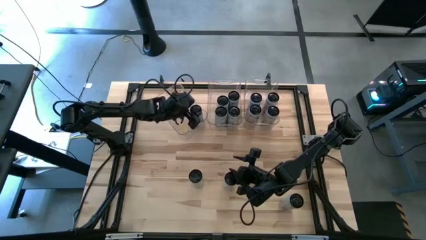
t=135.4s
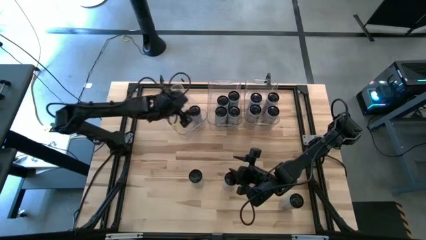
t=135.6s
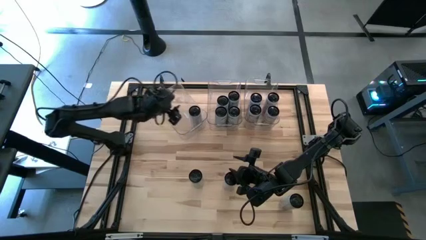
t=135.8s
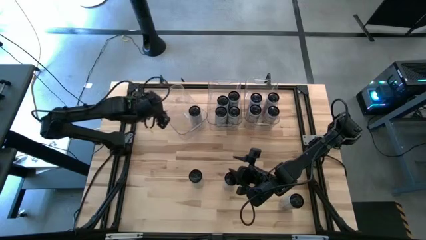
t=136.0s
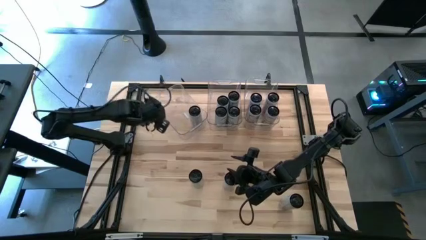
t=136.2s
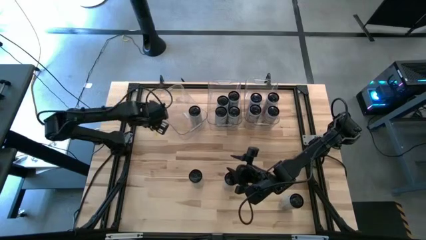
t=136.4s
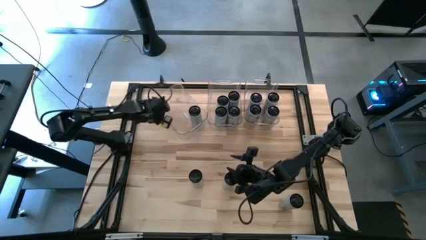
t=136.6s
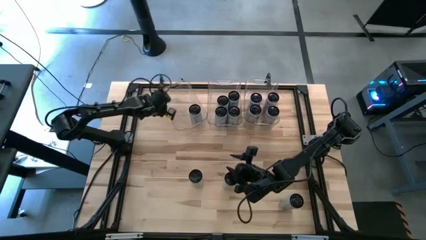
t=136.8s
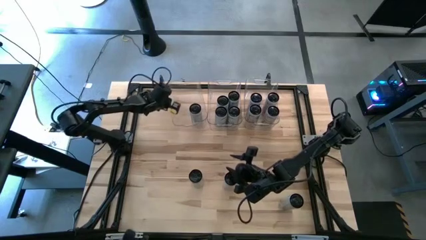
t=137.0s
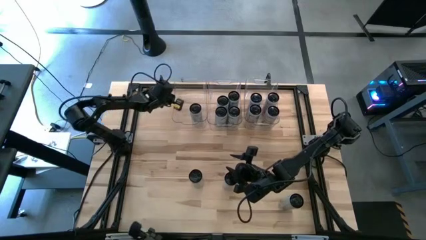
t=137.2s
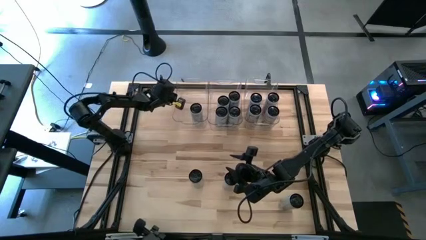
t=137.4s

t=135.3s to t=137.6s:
Task: Sort soda cans
Adjust the left transparent bin on the table

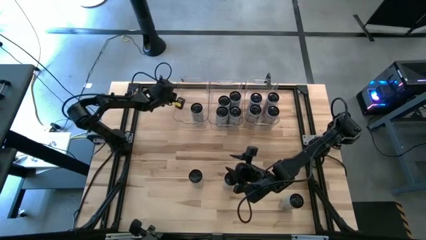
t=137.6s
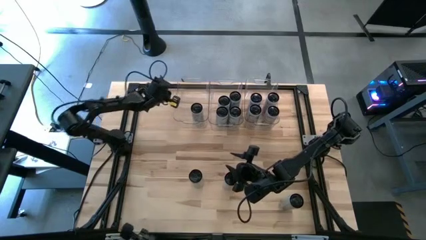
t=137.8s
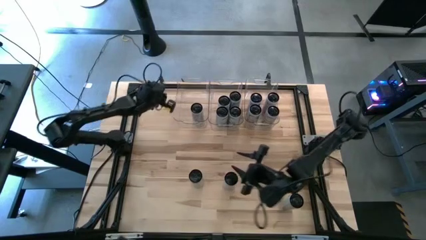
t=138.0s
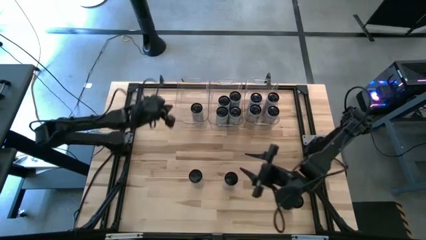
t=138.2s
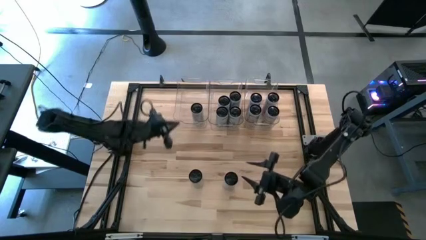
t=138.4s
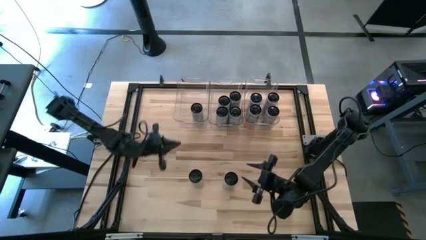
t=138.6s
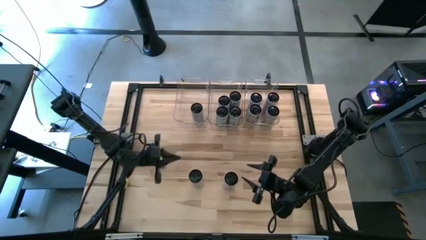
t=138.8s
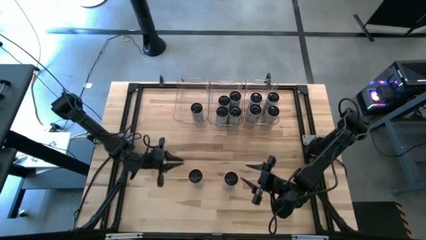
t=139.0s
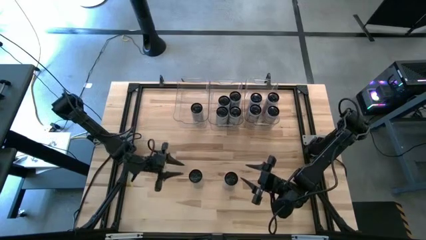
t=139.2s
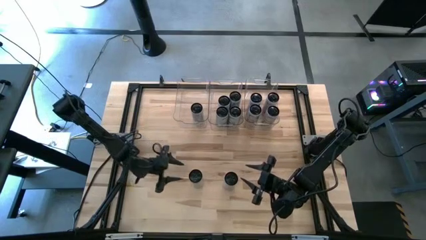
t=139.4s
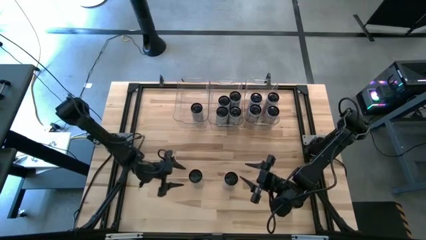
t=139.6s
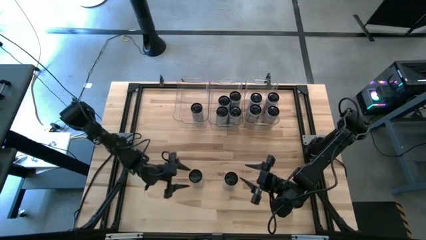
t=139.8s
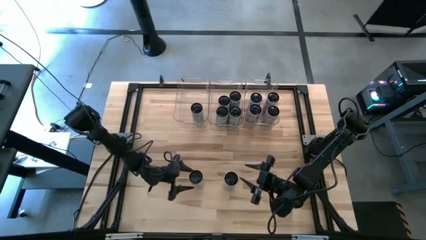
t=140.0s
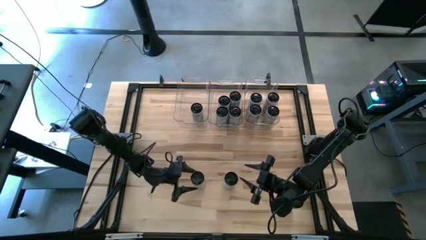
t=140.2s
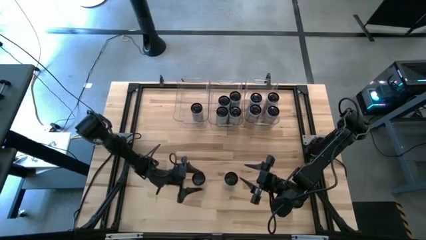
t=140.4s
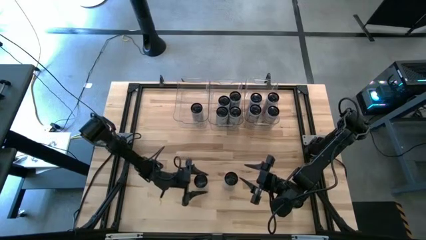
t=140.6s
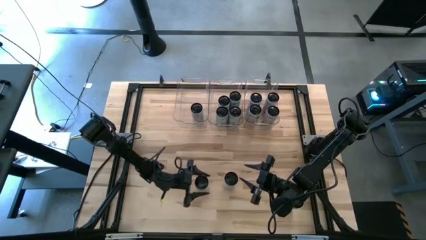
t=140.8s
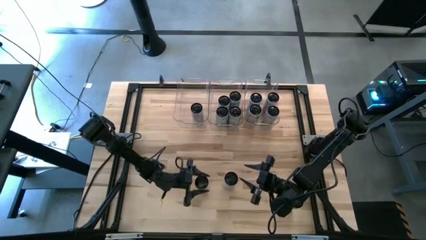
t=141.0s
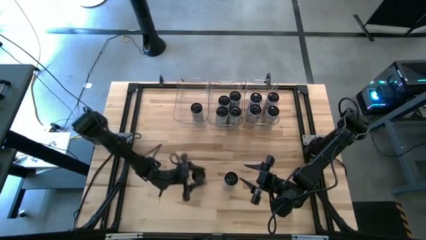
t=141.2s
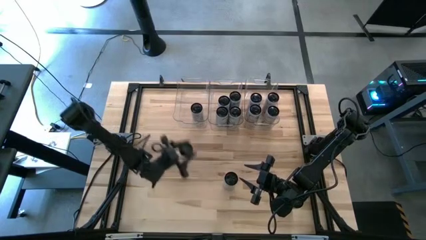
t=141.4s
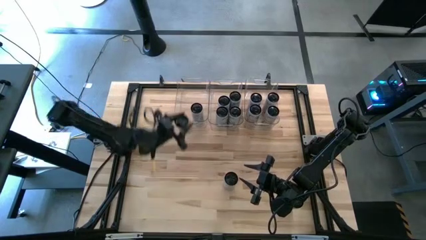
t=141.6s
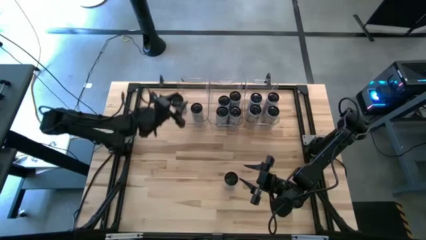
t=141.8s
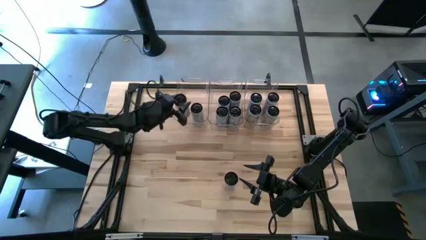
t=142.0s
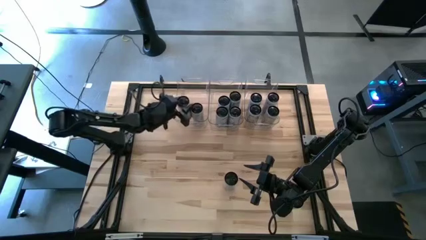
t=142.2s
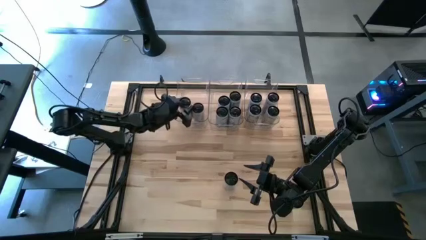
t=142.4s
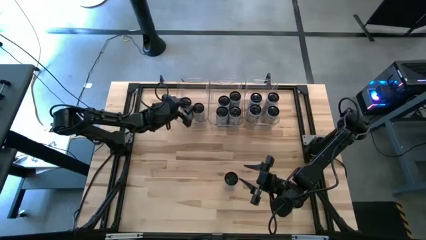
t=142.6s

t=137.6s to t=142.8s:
Put the top left white-yellow soda can into the left transparent bin

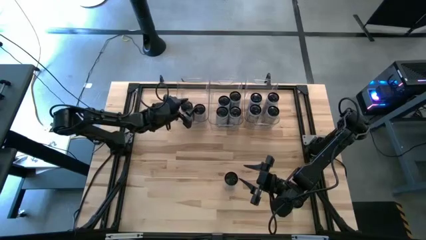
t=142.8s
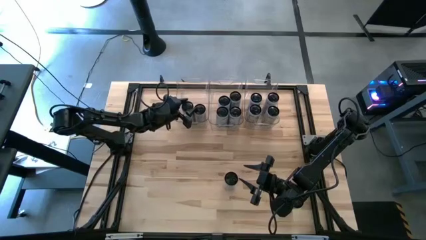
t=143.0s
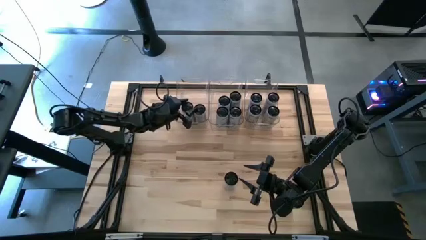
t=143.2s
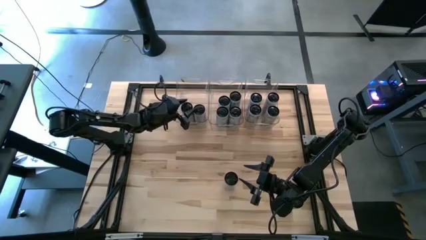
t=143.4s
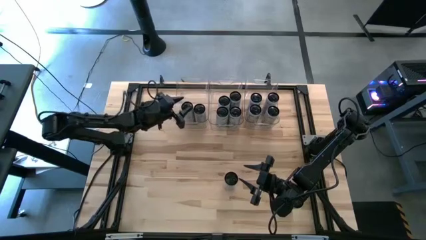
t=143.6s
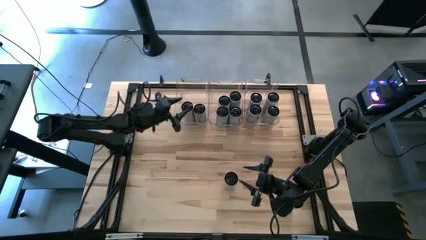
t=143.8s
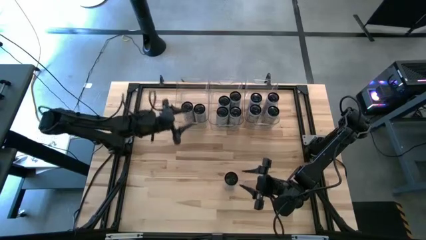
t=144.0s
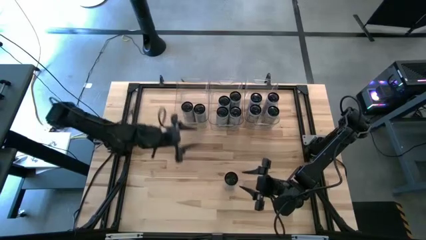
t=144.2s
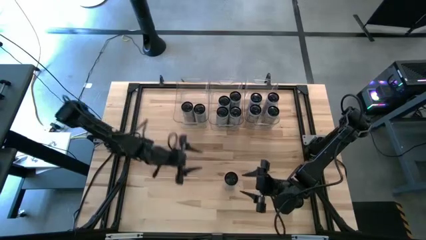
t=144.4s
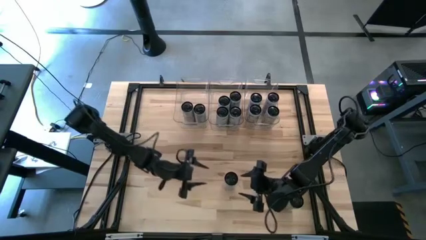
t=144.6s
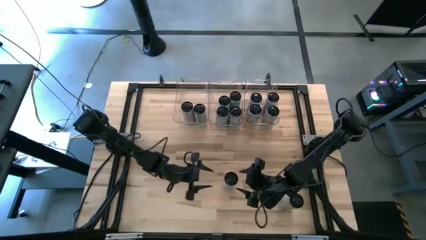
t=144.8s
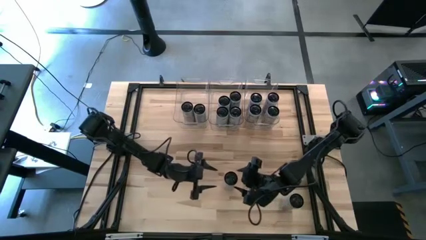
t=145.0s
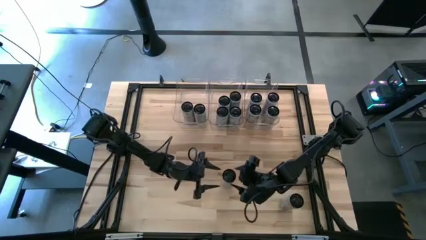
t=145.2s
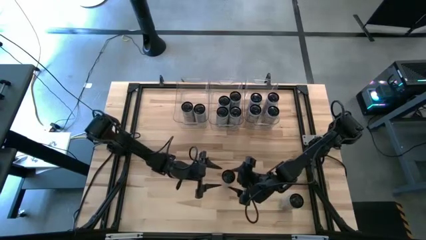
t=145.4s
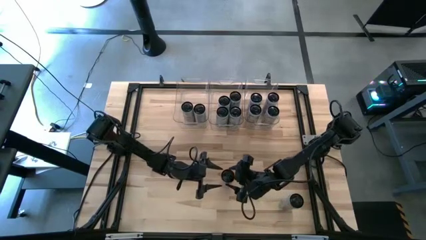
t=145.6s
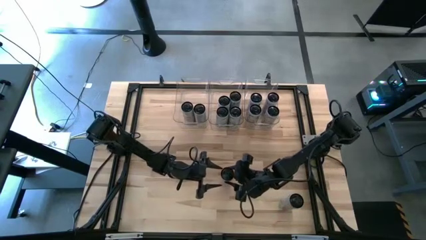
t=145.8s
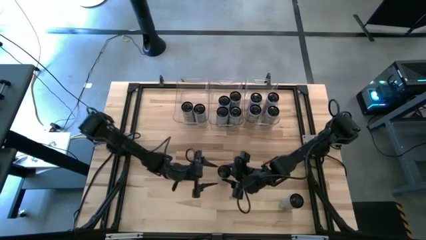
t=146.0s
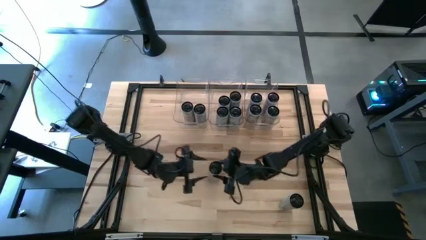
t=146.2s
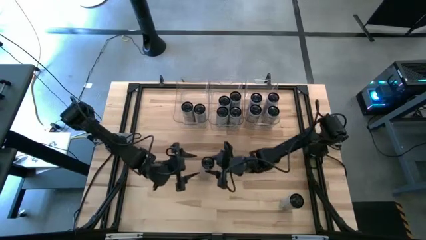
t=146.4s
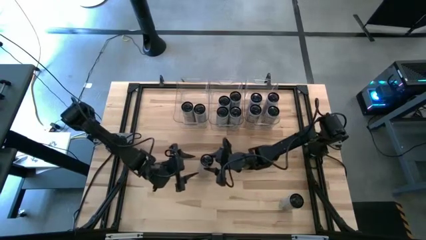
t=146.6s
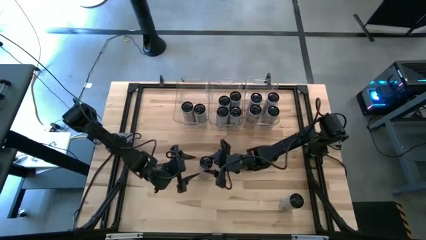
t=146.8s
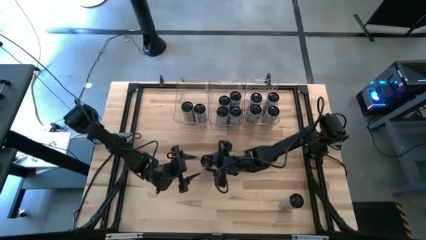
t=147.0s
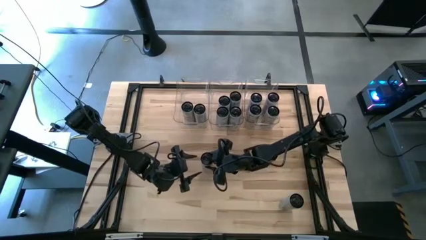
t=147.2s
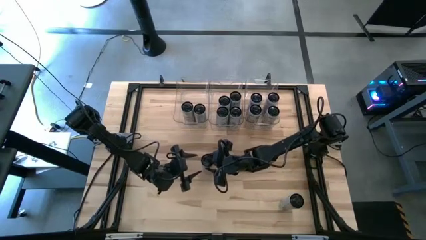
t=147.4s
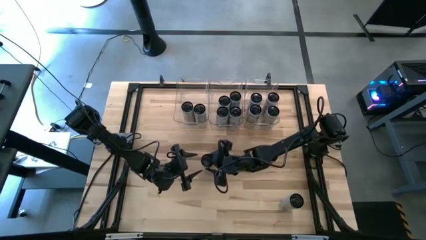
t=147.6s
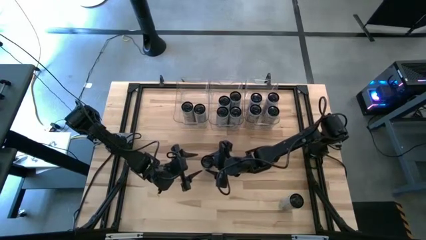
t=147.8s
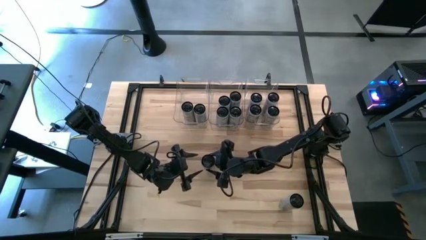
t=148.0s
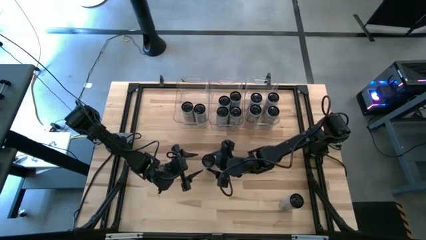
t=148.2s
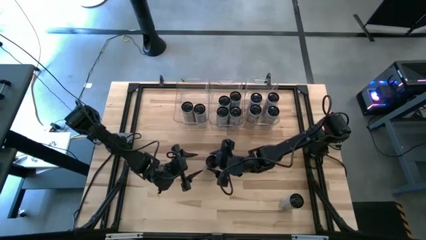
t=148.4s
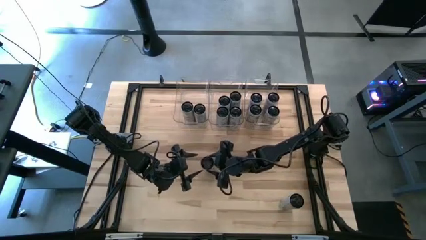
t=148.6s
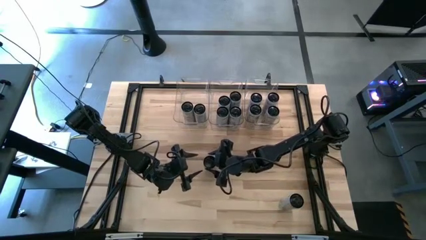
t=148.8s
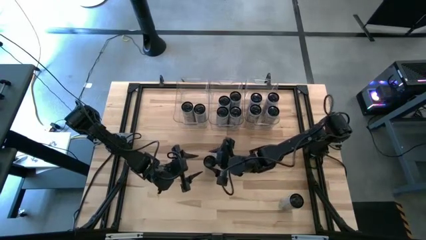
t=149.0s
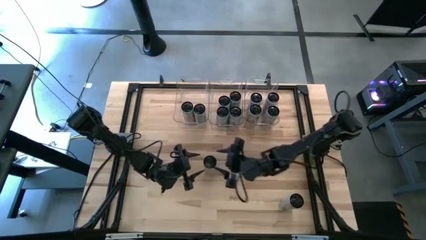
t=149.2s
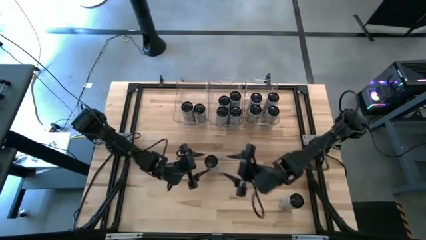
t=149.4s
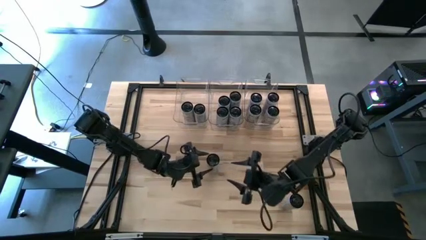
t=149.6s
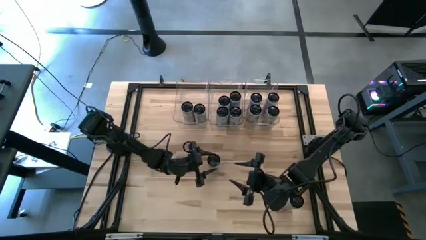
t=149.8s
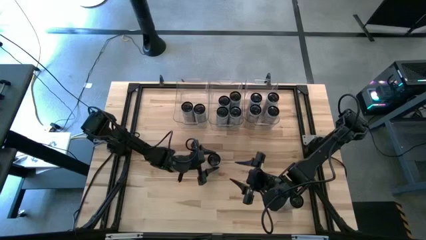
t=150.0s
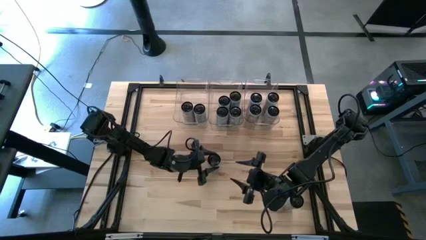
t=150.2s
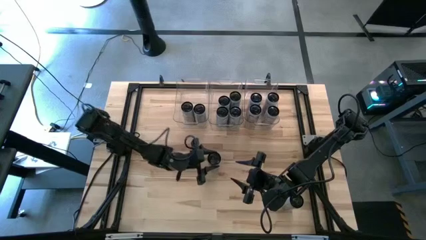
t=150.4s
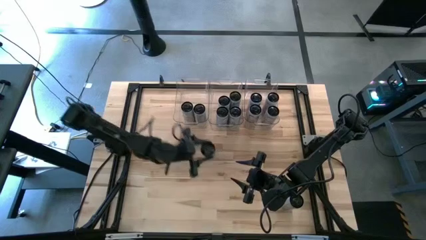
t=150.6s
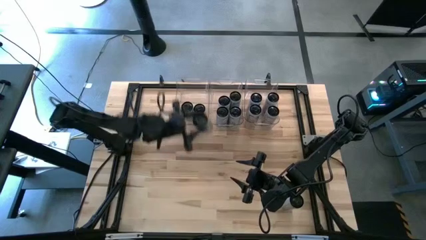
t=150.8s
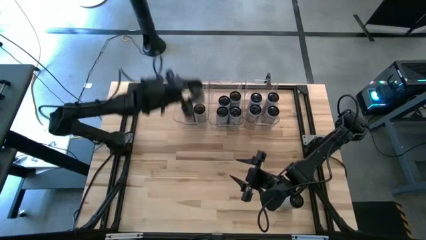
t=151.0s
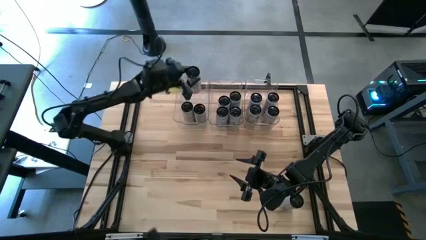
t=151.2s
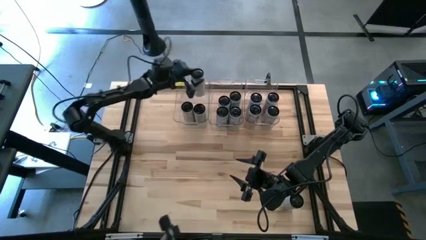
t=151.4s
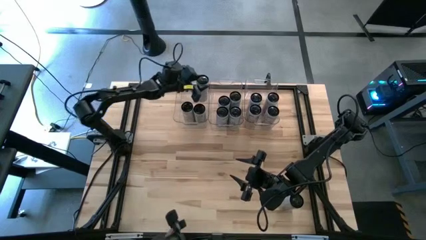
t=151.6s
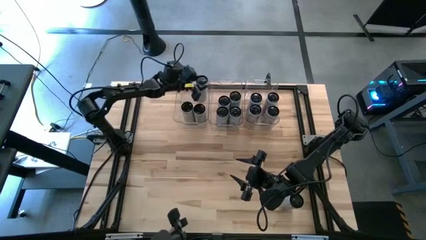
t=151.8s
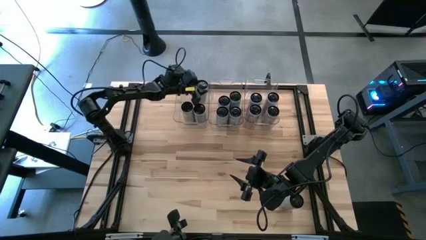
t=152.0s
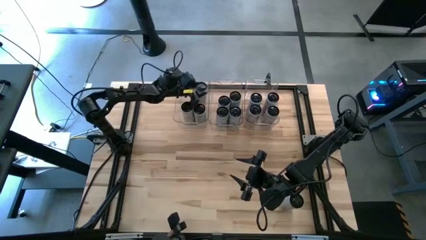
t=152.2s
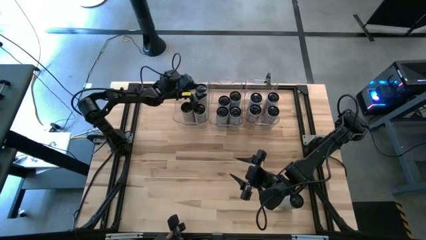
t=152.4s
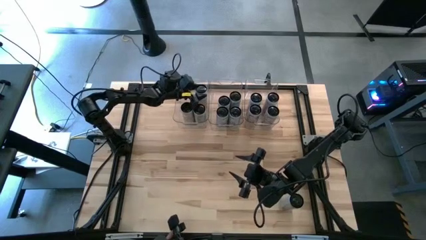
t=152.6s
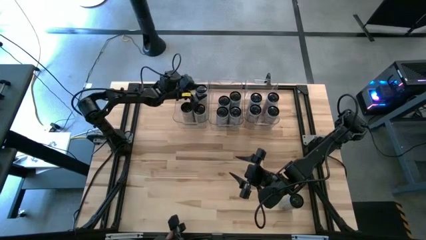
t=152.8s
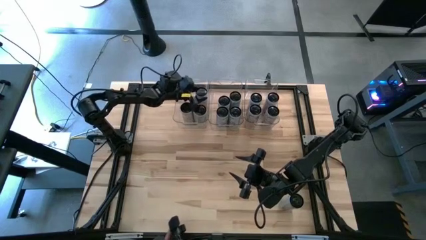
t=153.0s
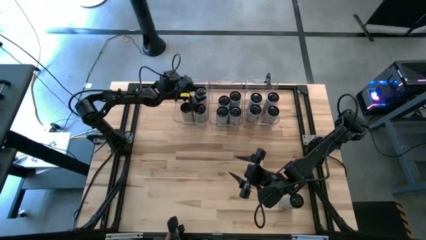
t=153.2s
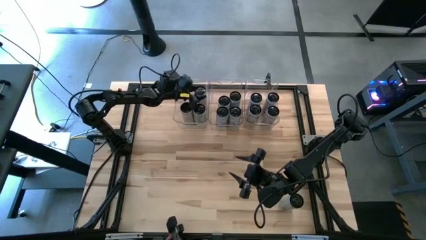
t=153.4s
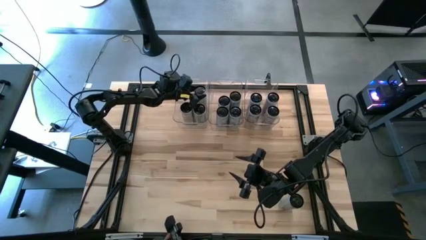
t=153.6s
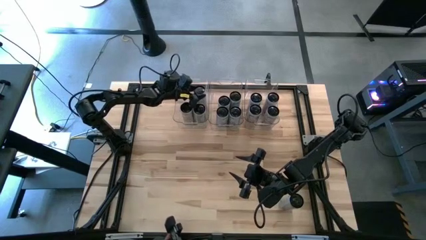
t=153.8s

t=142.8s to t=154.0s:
Put the top white-yellow soda can into the left transparent bin
